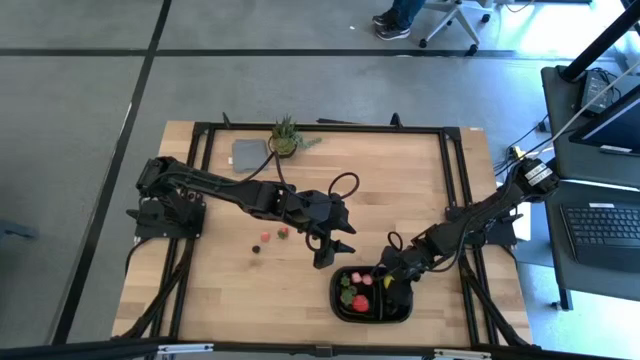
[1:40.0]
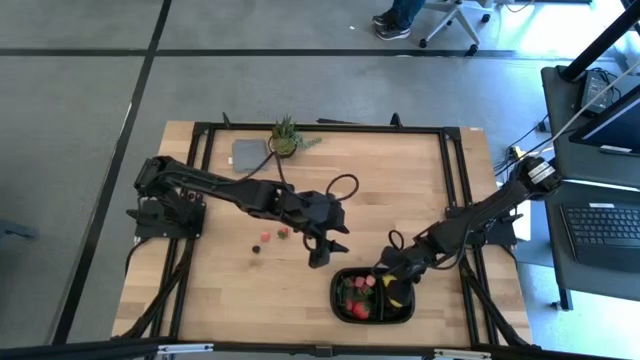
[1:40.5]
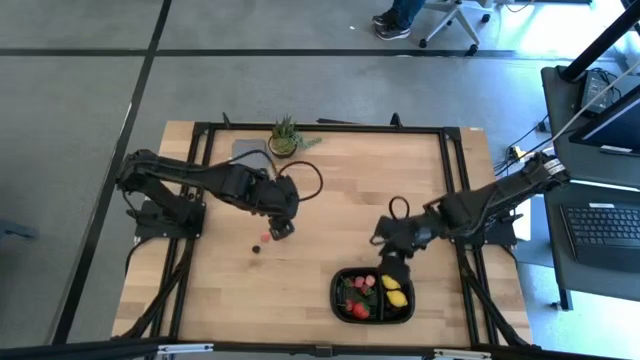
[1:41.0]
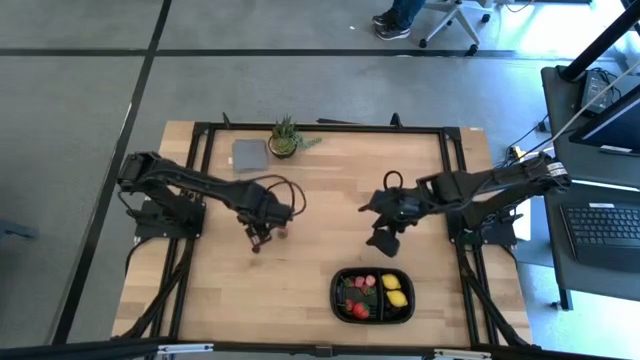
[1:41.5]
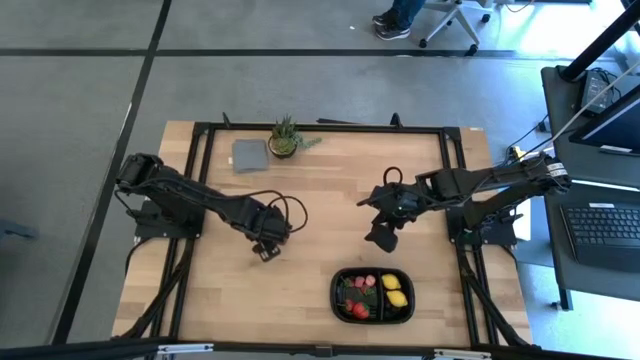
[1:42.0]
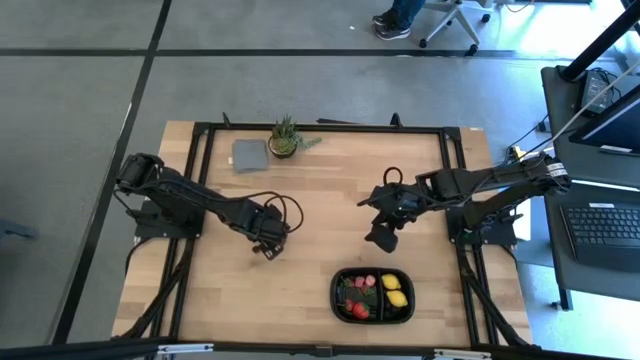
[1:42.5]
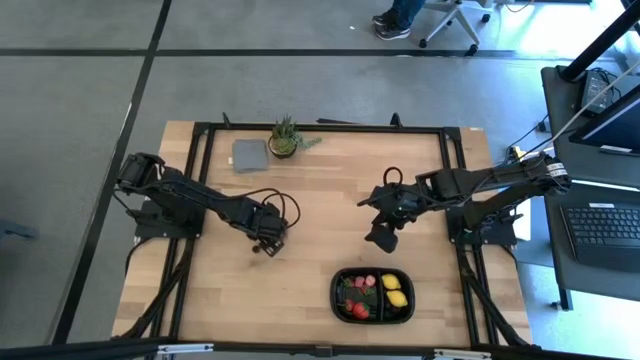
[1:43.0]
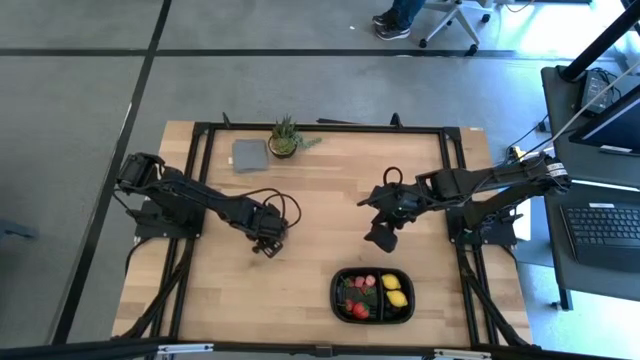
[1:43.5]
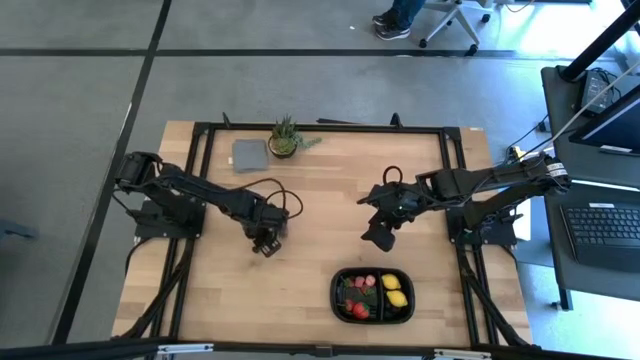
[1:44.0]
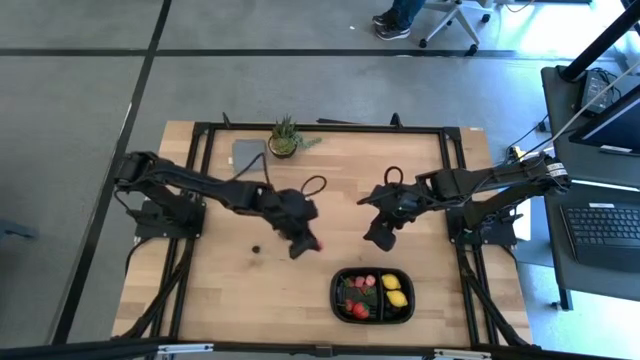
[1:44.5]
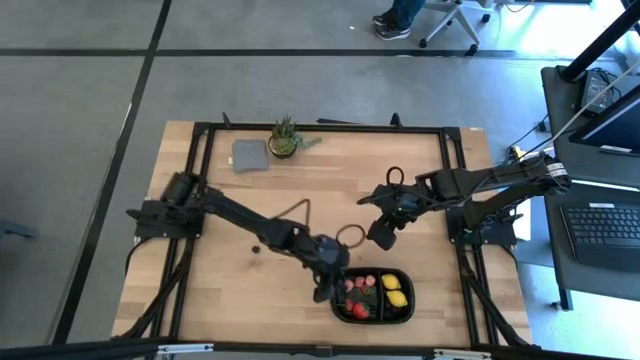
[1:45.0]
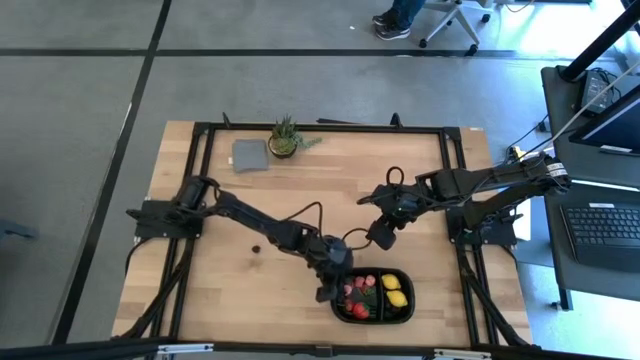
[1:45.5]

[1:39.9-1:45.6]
Task: Pick and placing Produce into tupperware
Put the pink peach into the black bin

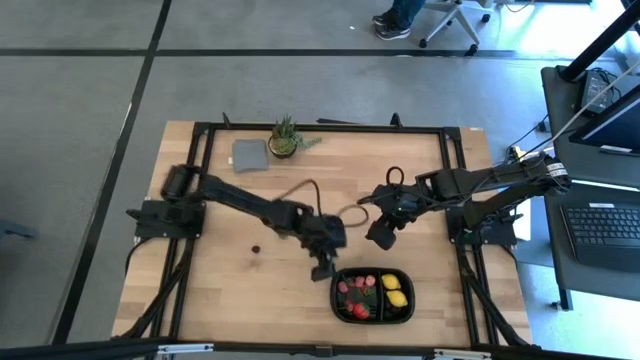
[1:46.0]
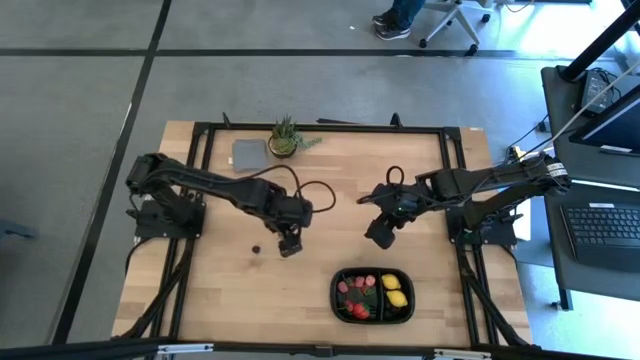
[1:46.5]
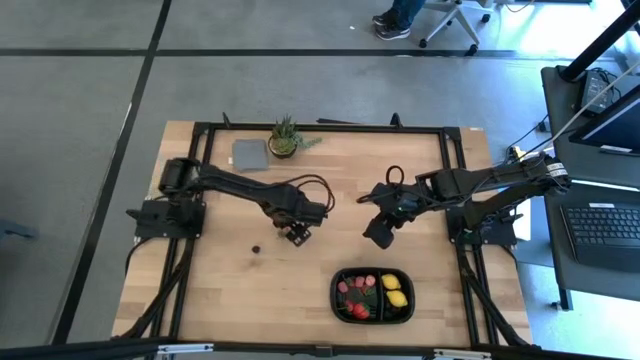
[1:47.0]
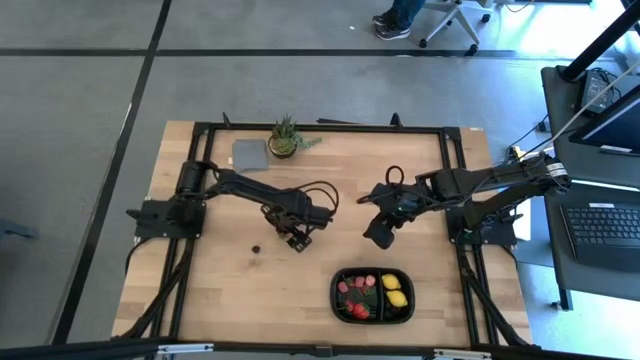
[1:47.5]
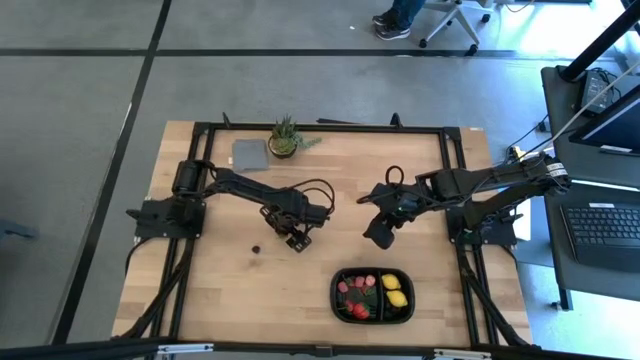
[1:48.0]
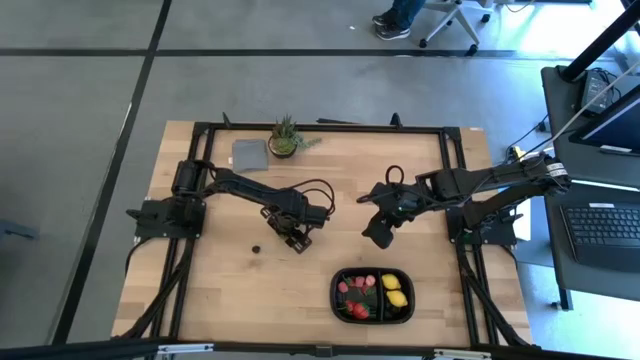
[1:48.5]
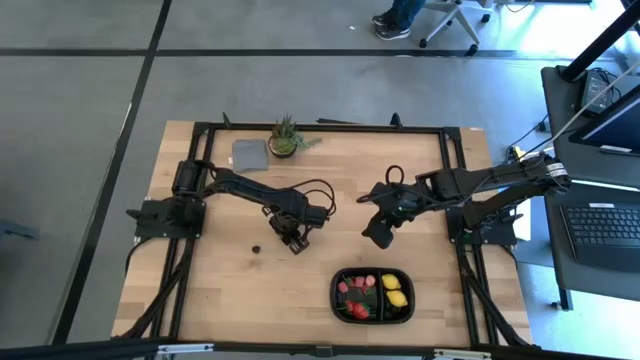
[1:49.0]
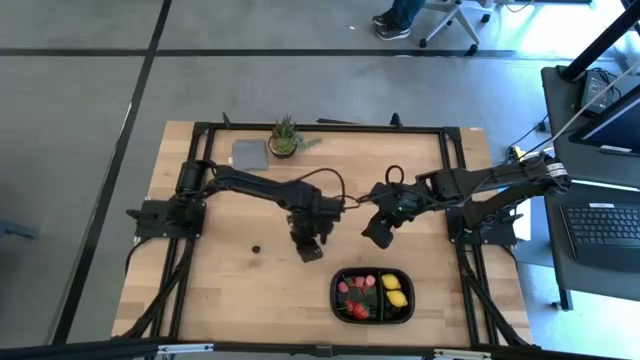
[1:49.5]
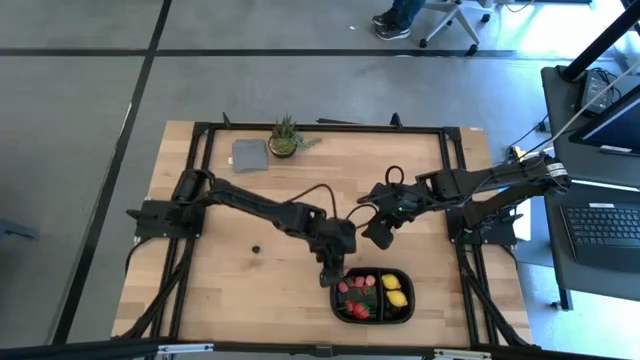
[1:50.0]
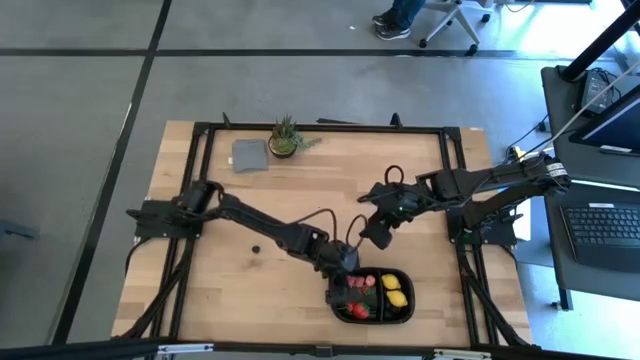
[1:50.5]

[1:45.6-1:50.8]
Put the red strawberry into the black bin

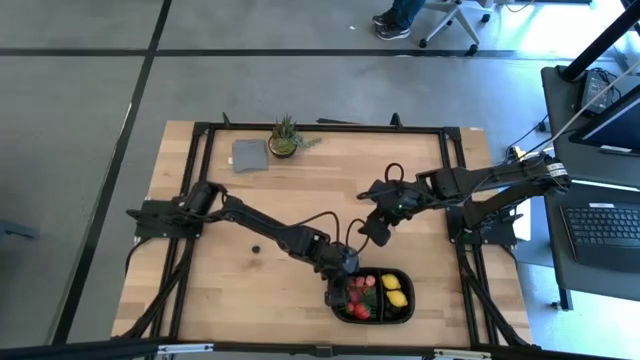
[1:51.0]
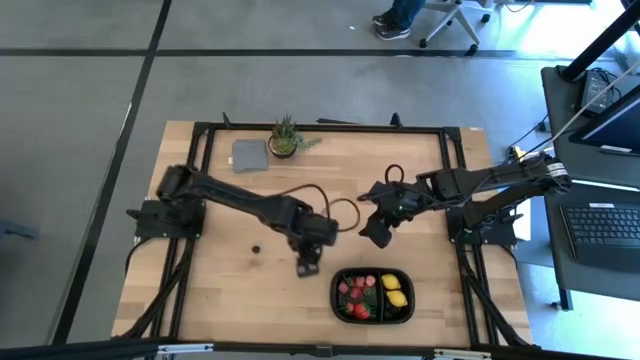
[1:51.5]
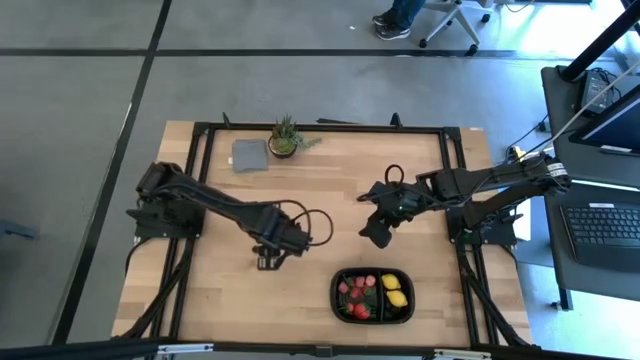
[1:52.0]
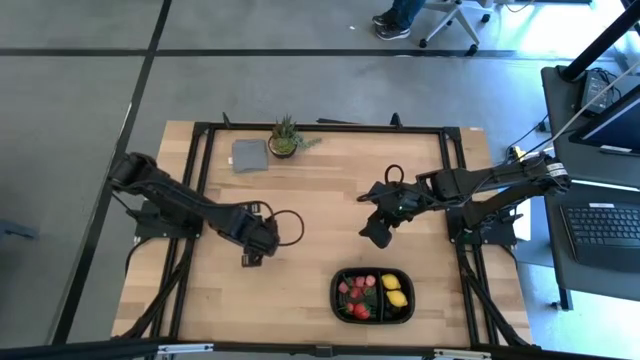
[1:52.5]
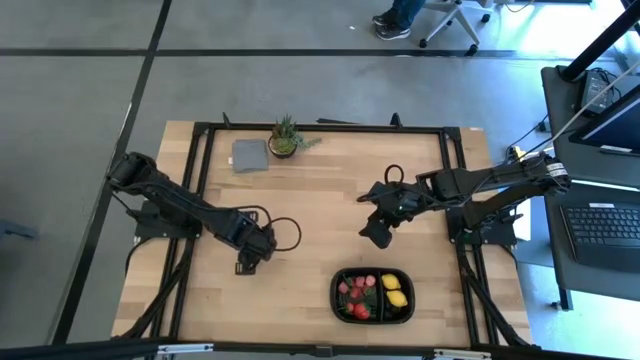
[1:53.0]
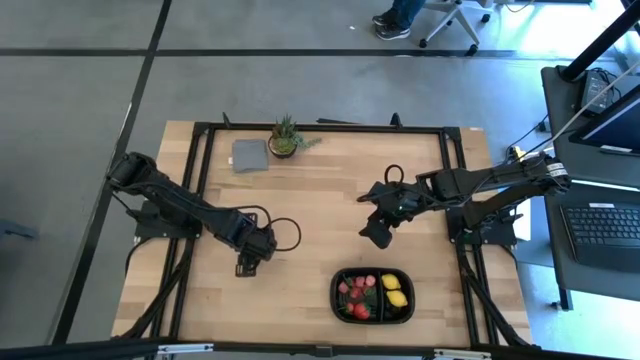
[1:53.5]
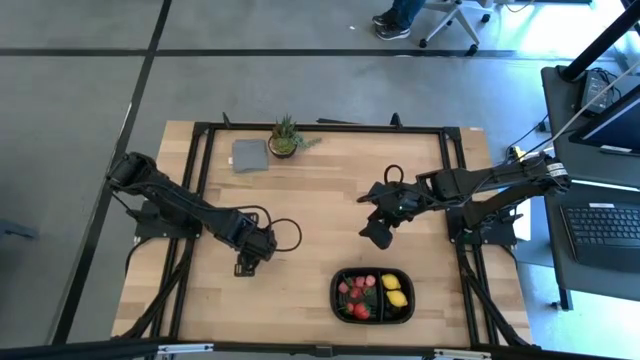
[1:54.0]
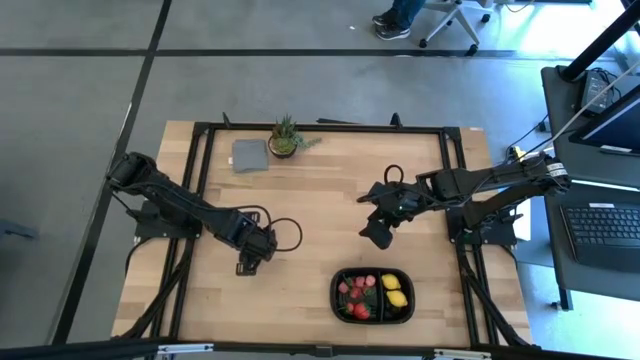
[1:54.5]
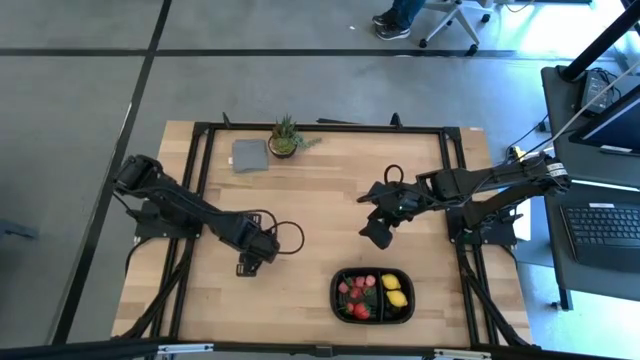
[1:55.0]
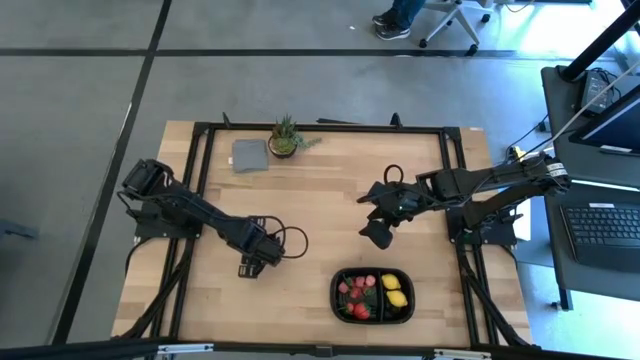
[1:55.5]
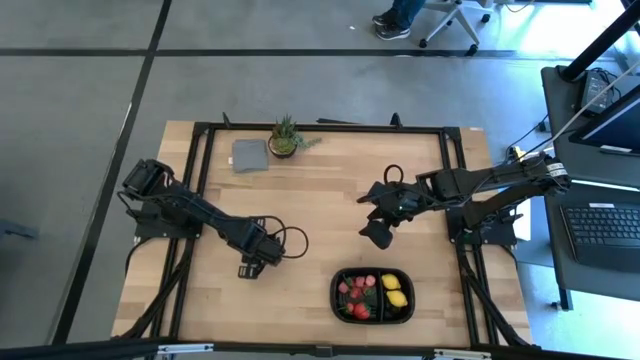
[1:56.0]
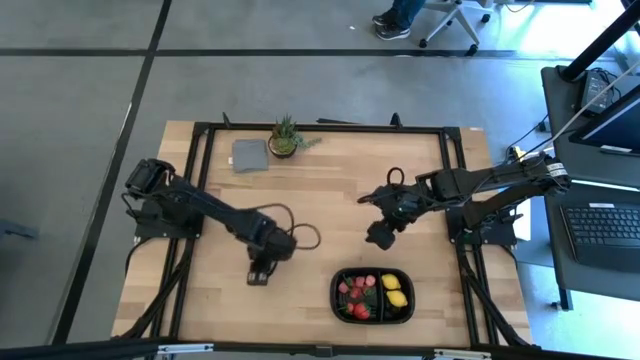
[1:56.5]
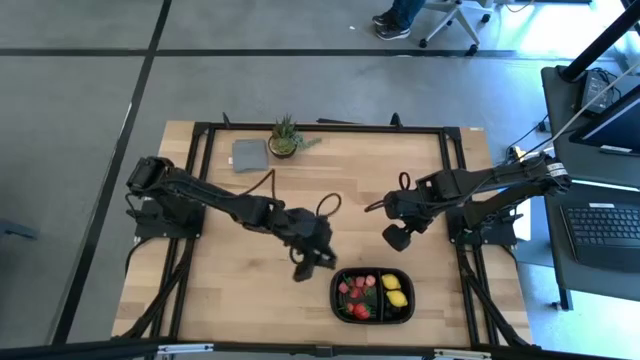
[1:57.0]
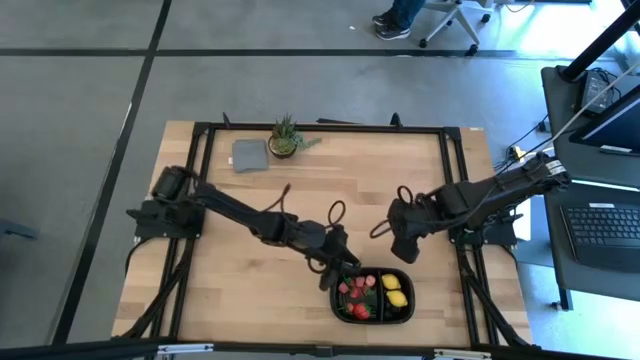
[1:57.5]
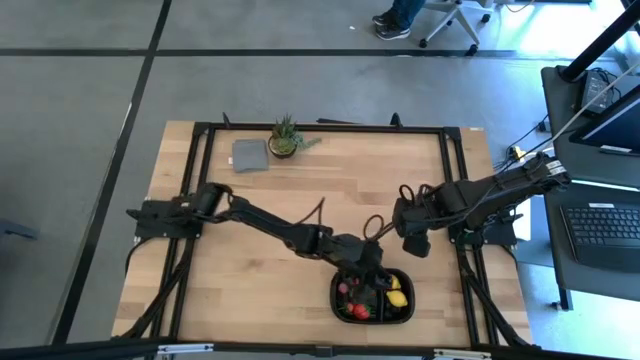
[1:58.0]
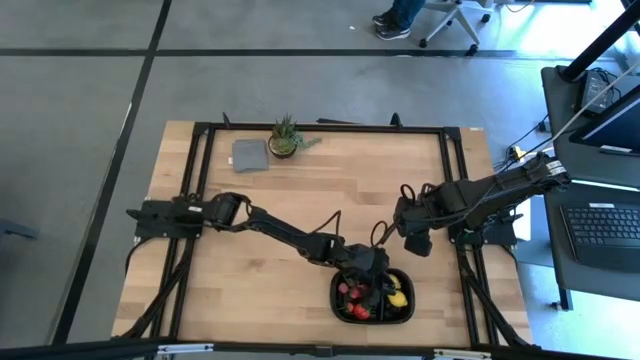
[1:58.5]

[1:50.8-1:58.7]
Put the black cherry into the black bin

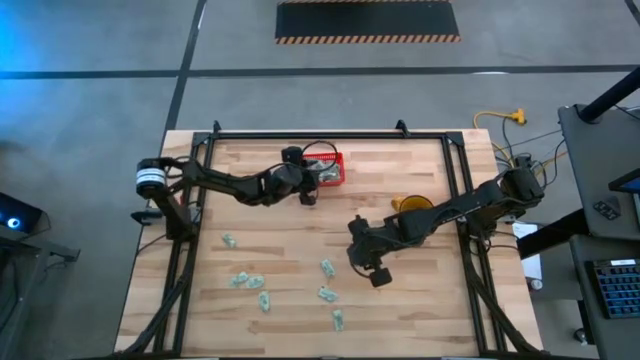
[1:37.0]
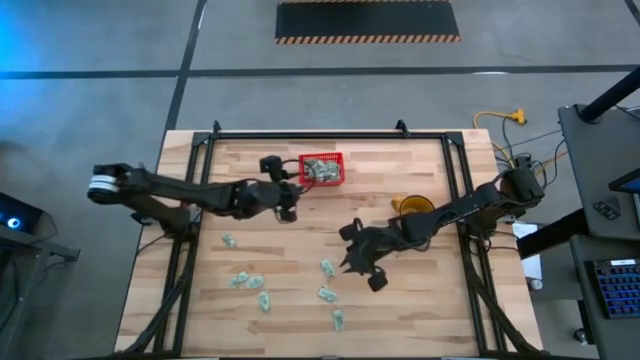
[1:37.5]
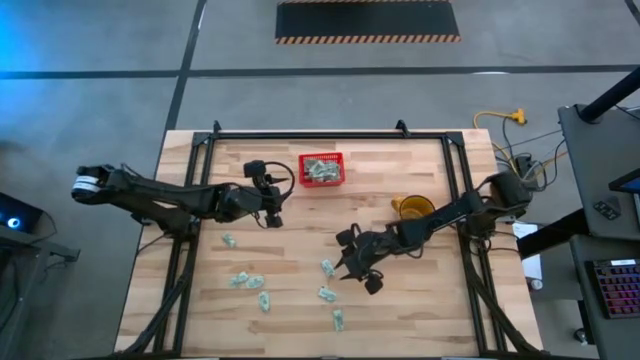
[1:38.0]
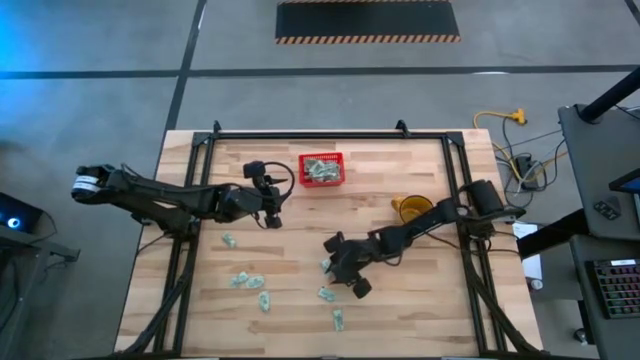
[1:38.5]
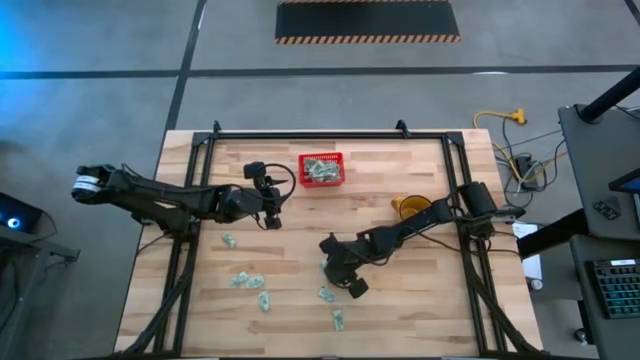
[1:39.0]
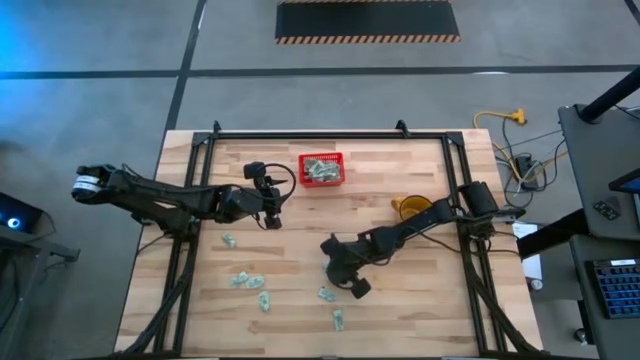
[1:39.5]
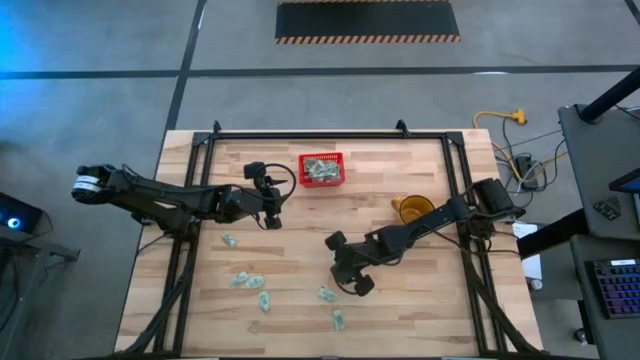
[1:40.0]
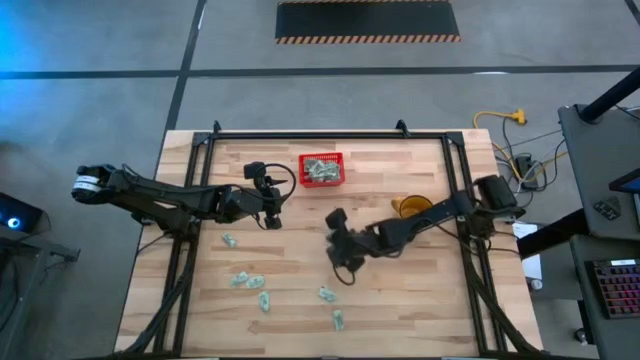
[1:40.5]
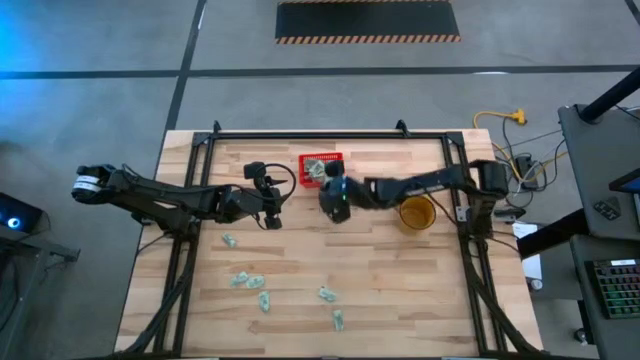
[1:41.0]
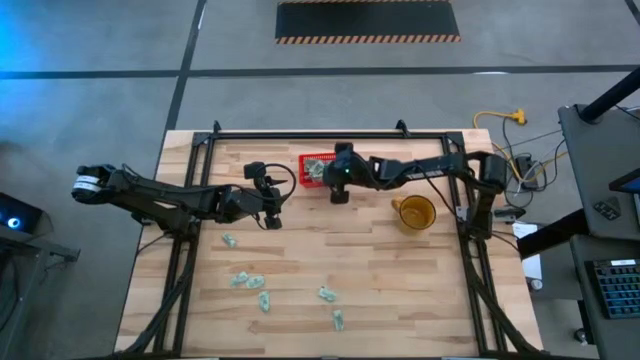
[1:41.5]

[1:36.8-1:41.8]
Task: Pick and place Stevia / Truvia into bins
Put the white stevia packet into the red bin
